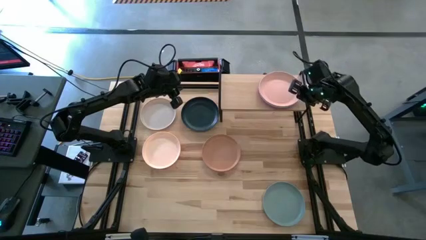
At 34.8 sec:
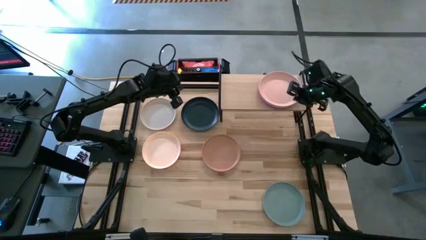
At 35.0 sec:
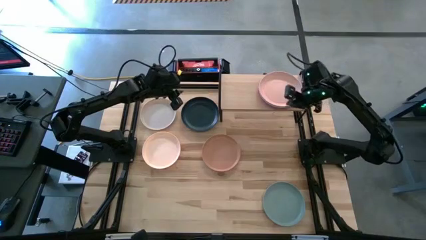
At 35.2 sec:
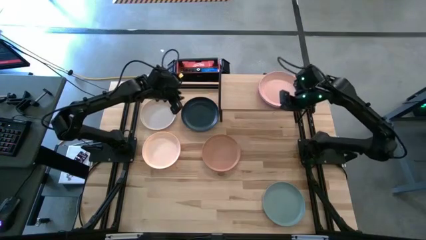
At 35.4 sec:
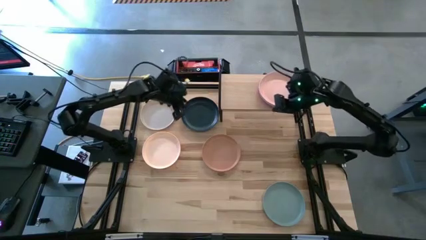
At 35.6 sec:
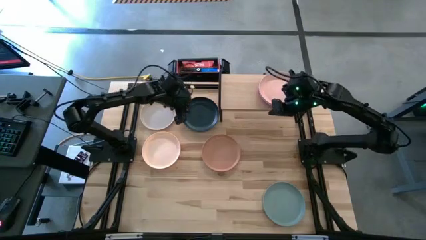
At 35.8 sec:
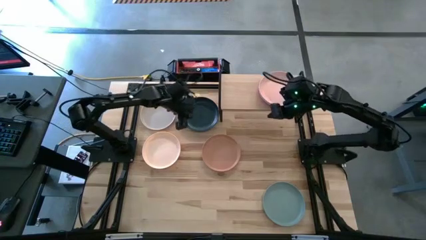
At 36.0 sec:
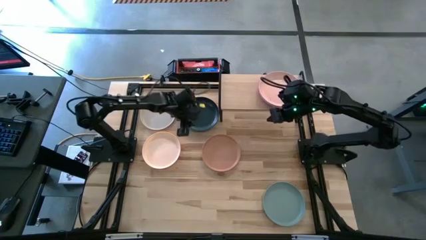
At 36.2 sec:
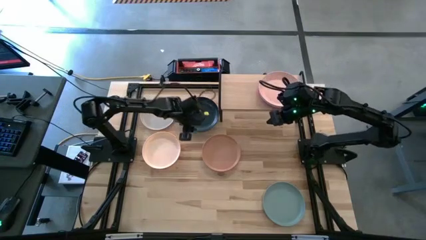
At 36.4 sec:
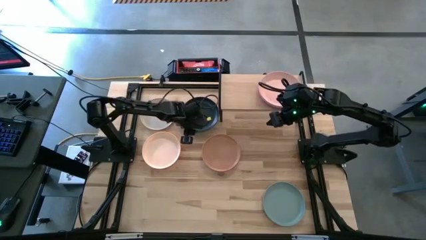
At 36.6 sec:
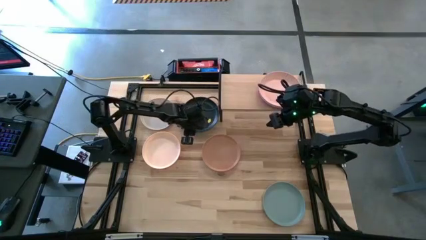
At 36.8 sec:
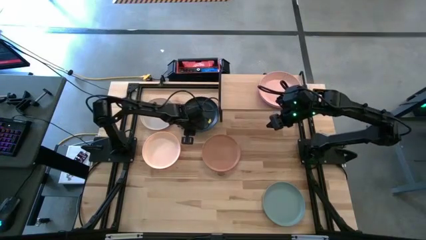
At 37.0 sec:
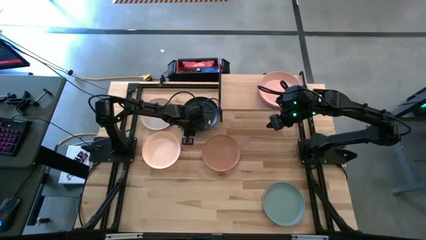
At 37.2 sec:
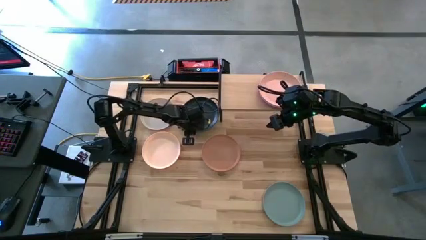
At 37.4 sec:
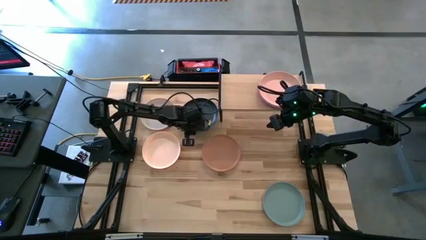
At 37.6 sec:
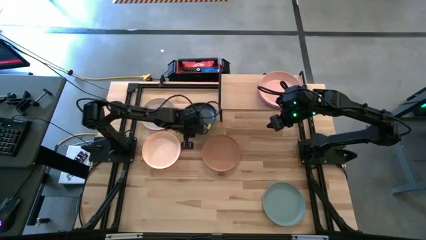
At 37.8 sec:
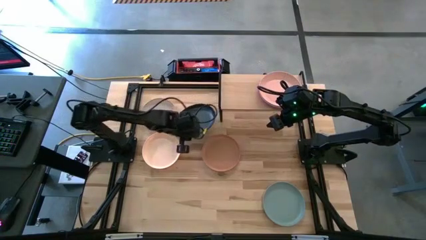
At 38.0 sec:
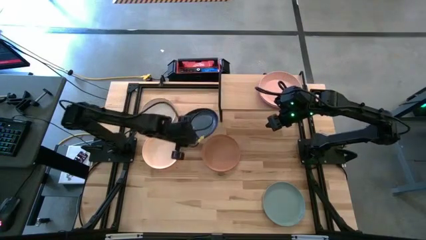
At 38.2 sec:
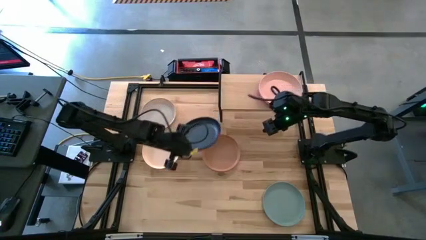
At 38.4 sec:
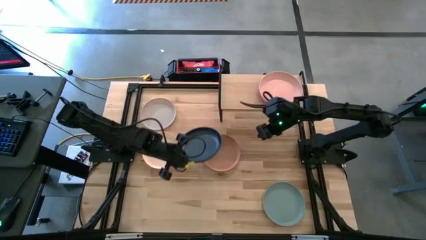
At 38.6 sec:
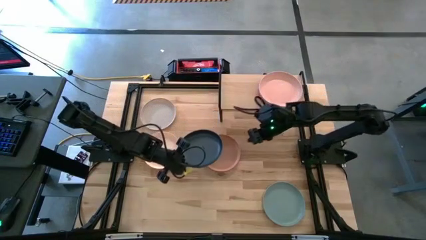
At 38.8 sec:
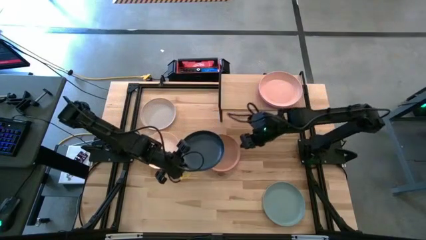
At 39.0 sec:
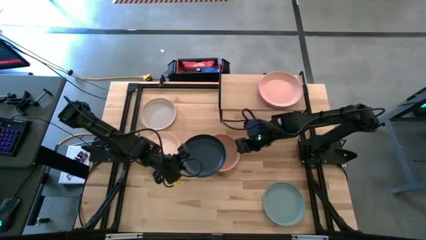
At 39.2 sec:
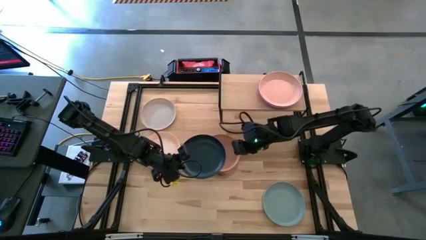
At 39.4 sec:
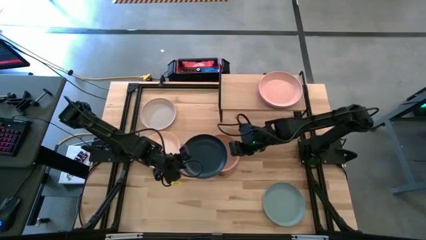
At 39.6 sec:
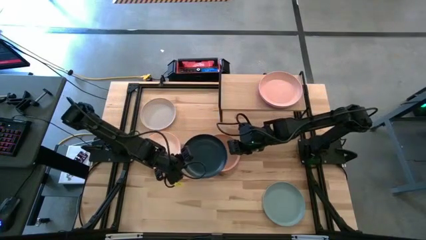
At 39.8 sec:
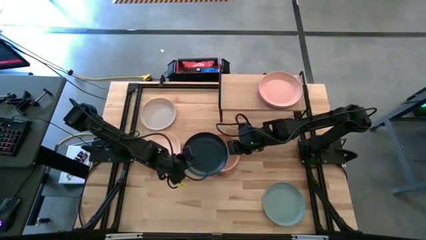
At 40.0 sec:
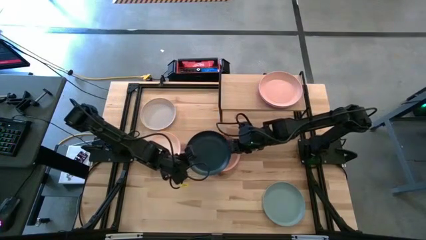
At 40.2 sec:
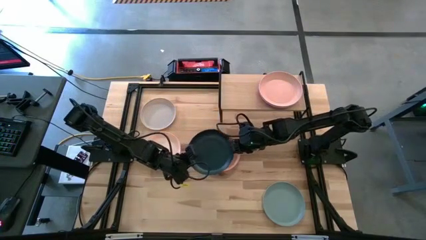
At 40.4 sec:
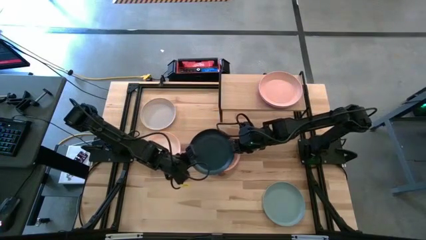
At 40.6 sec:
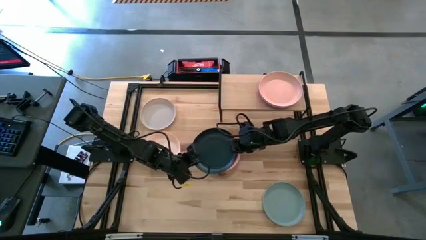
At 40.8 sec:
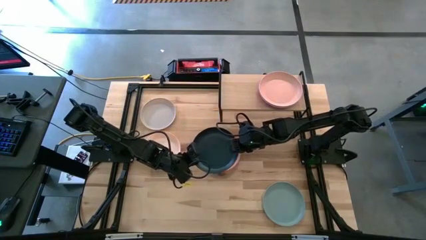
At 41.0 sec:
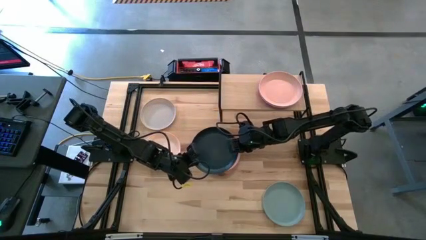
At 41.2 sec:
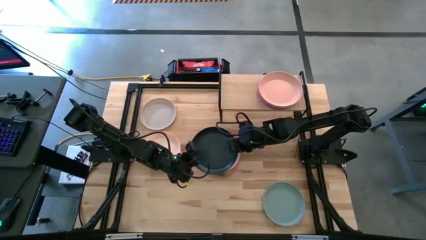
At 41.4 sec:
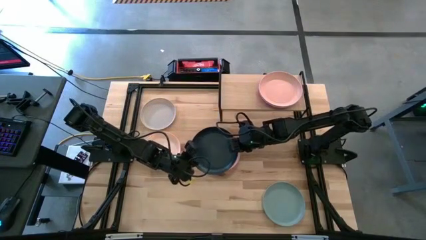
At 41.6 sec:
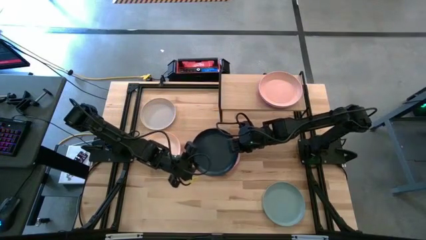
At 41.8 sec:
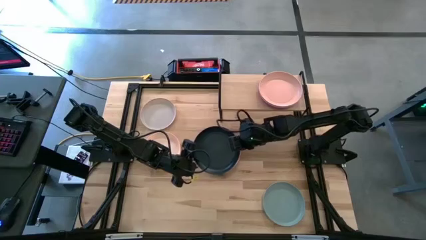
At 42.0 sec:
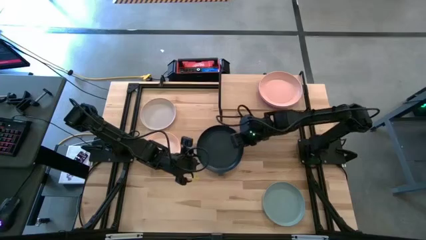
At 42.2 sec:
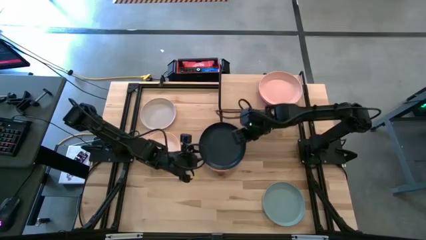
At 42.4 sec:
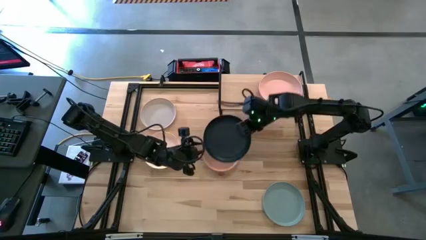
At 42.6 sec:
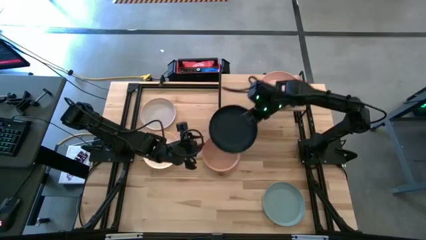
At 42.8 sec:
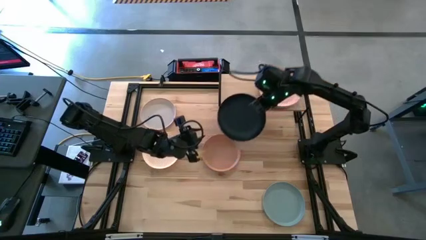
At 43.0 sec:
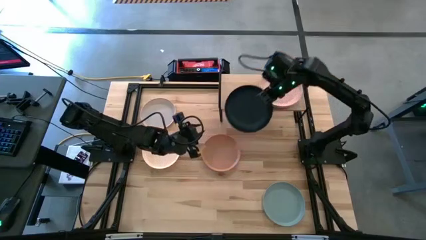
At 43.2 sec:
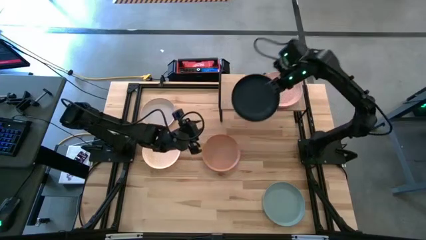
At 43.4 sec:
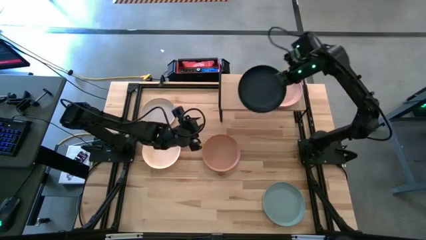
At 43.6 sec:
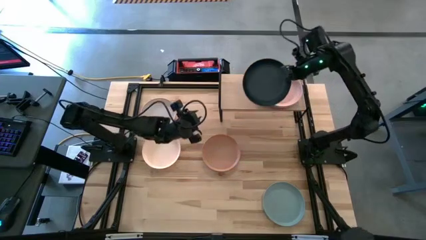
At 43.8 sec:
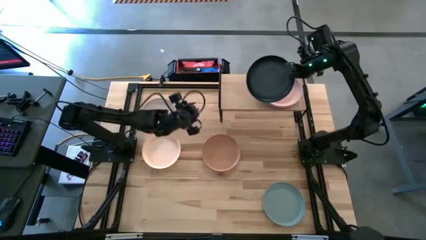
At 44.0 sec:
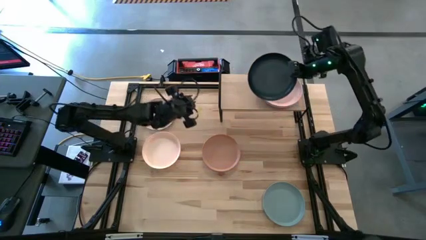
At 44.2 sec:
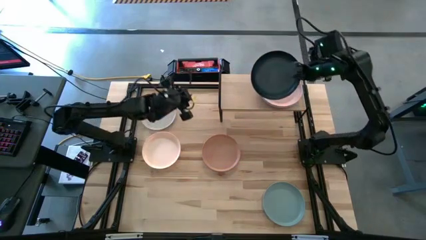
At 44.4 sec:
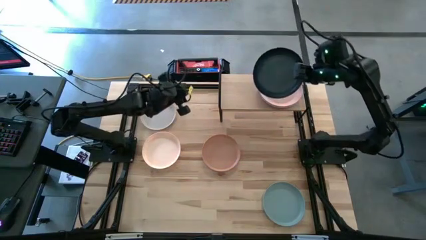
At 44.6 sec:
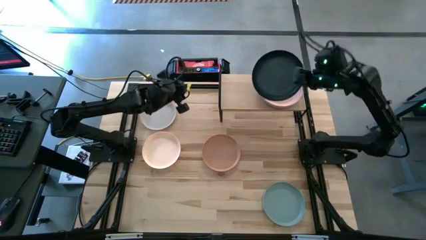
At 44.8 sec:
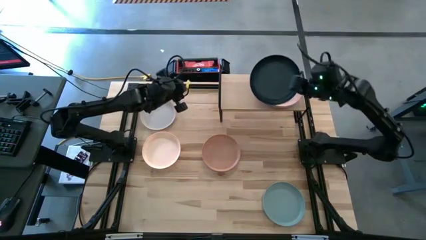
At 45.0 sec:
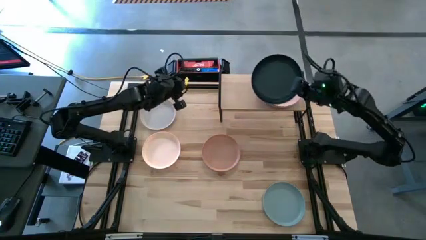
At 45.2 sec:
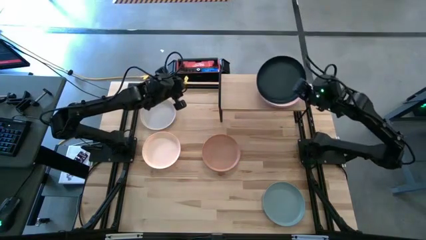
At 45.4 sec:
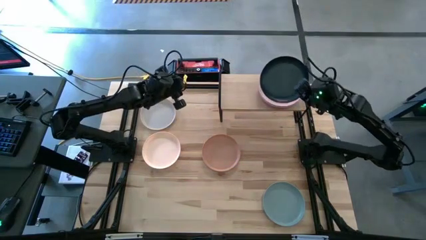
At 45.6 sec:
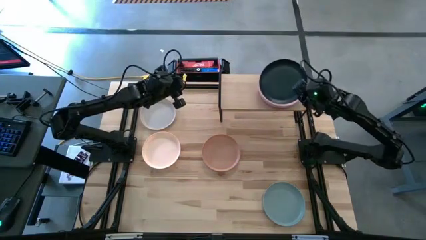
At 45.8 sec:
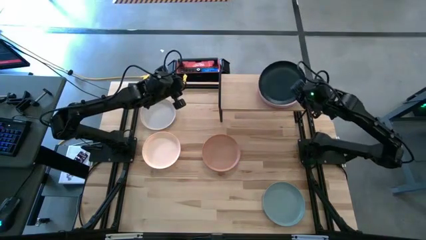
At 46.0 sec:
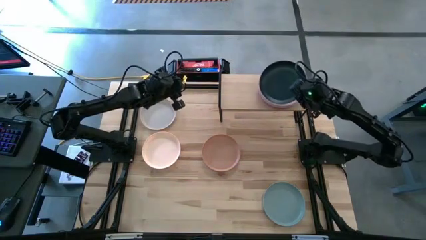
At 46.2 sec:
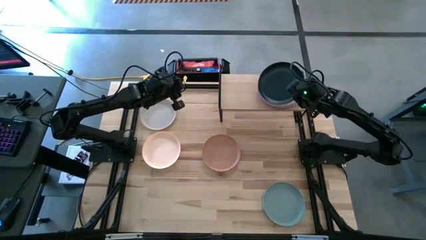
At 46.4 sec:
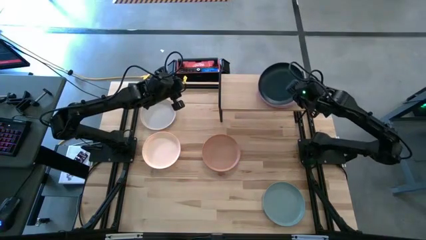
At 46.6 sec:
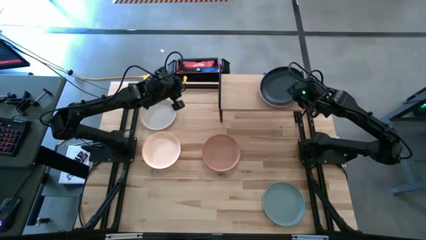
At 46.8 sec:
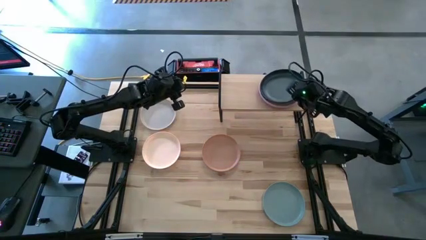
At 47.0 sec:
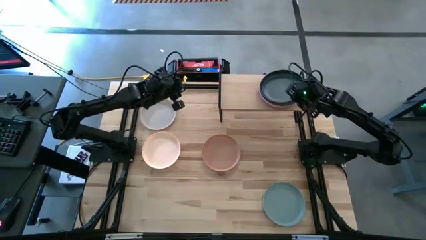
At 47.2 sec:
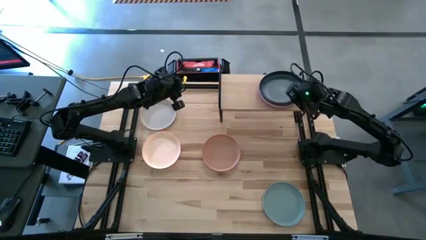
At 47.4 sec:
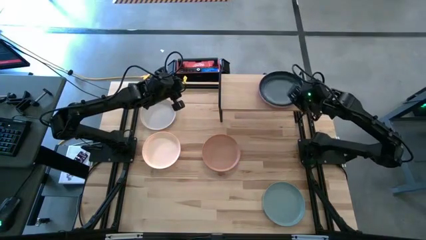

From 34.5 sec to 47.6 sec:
Task: Place and stack plates onto a shelf
Stack the dark blue plate on top of the light pink plate on the shelf
